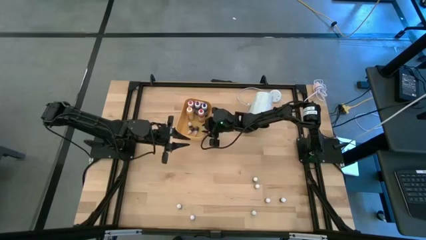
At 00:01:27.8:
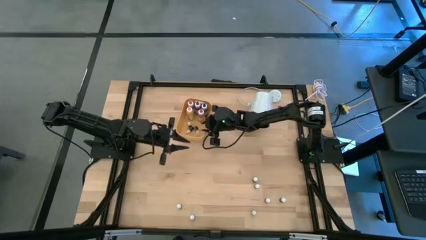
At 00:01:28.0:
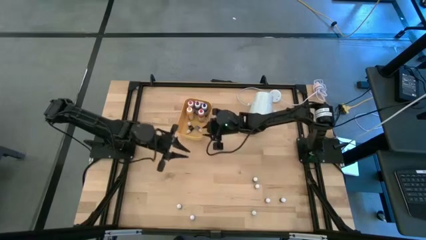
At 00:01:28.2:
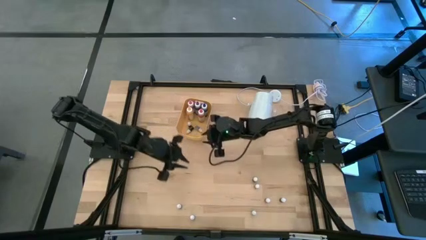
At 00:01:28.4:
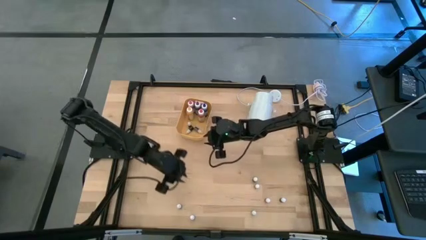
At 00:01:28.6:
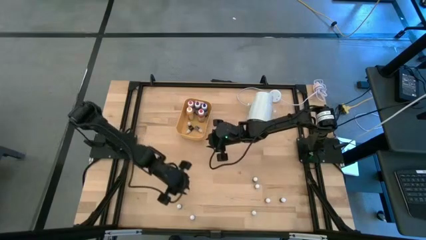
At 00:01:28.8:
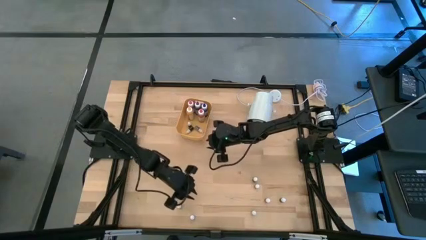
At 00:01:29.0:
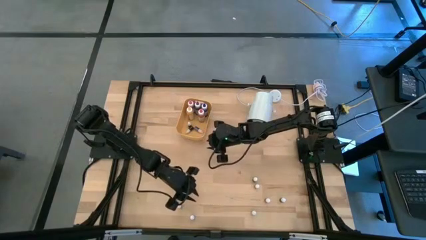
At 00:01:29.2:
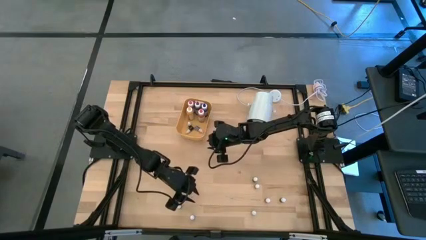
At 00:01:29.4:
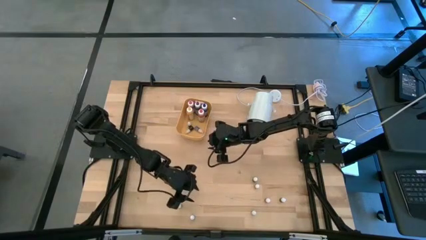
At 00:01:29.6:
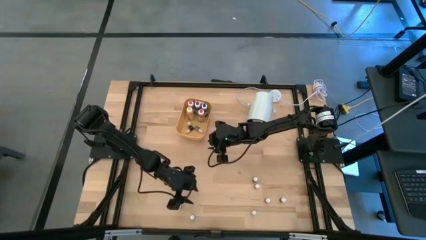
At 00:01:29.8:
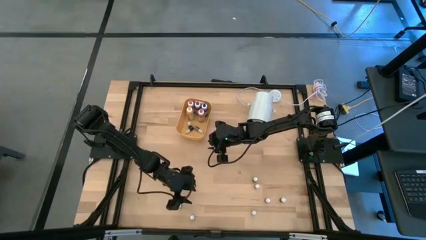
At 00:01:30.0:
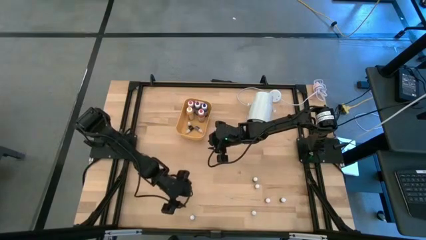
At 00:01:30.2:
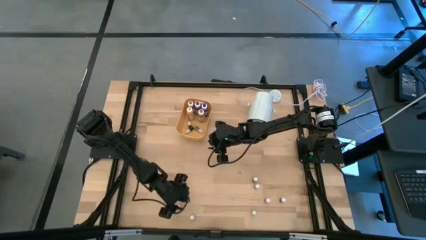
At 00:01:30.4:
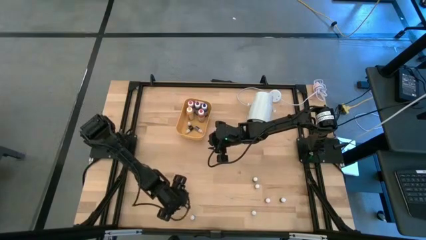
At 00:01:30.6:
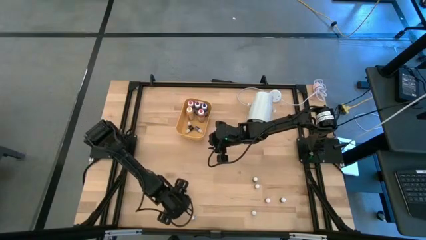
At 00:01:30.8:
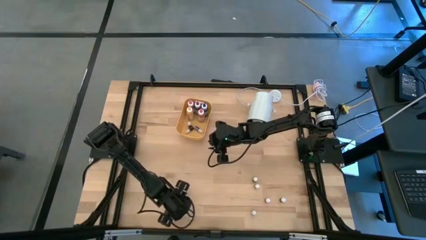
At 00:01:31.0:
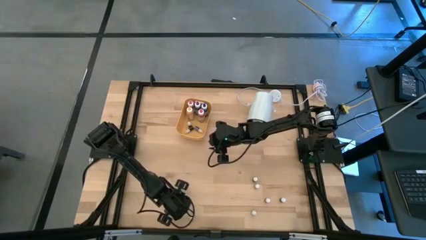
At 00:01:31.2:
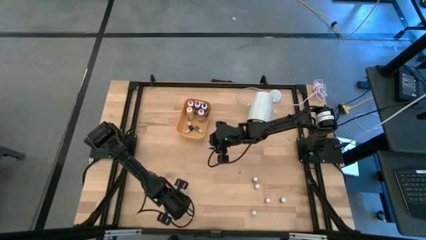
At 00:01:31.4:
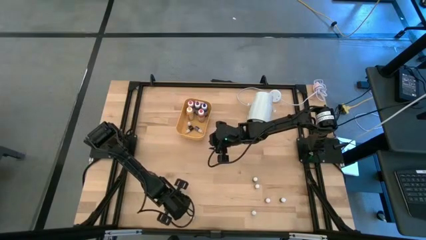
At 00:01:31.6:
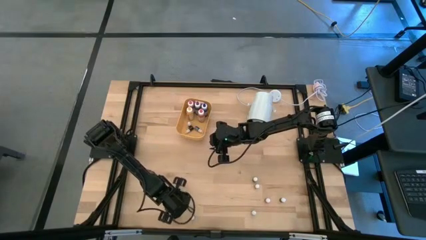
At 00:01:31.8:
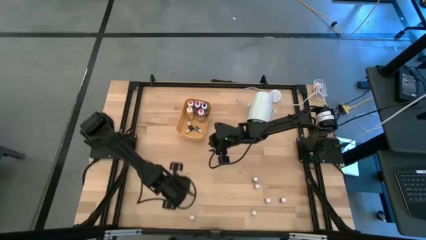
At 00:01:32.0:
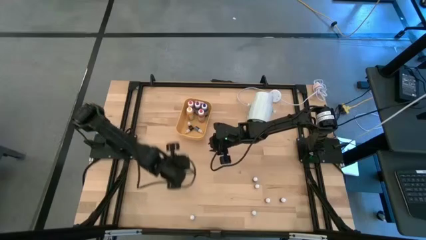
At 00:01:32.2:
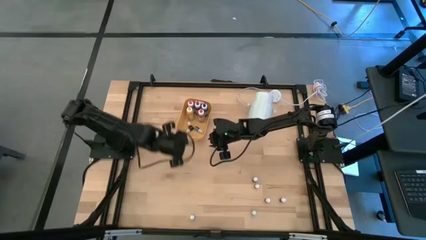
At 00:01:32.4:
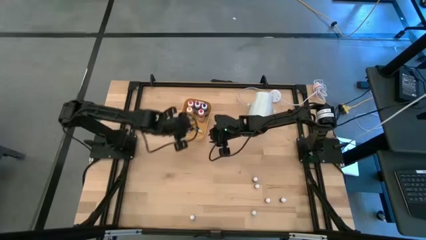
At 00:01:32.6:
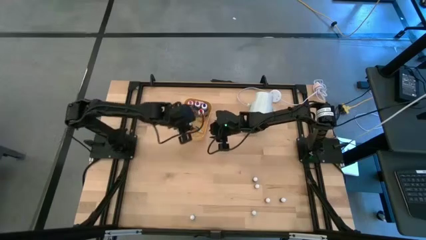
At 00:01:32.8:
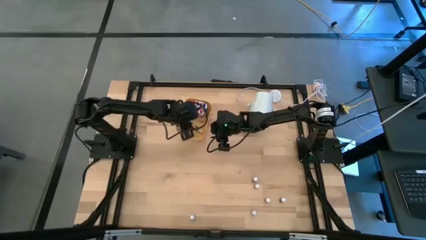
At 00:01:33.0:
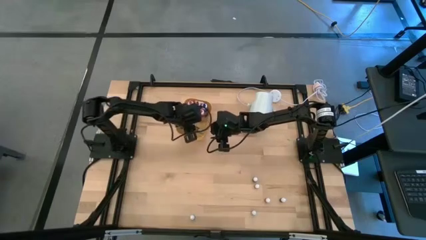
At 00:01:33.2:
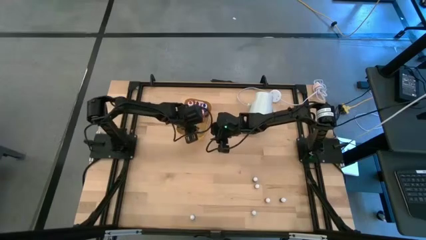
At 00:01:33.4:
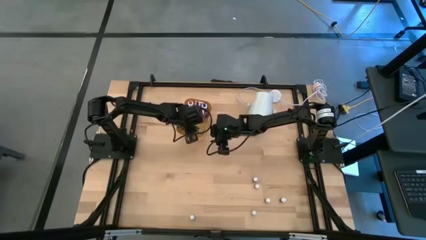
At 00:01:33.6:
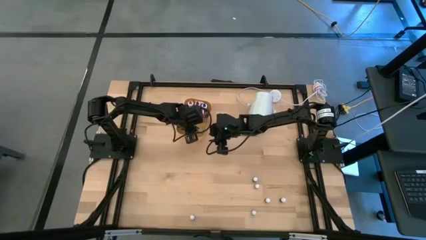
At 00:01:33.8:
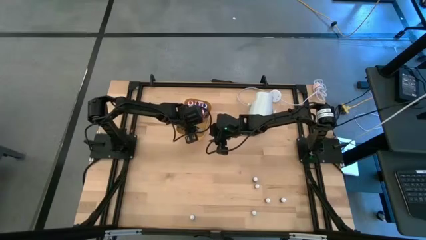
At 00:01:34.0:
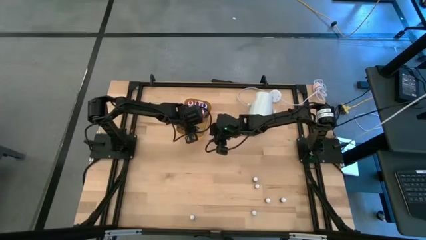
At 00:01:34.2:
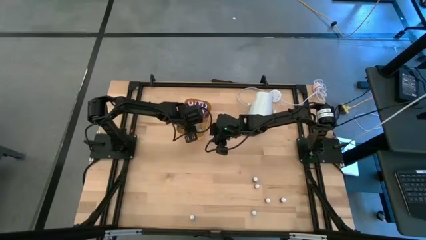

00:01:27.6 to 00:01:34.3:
Task: Pick & Place food coloring
Put the small purple food coloring bottle into the yellow bin

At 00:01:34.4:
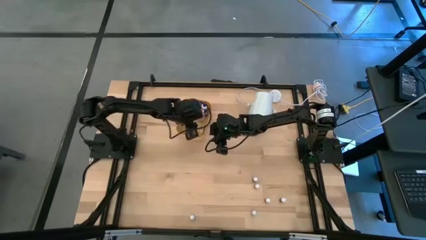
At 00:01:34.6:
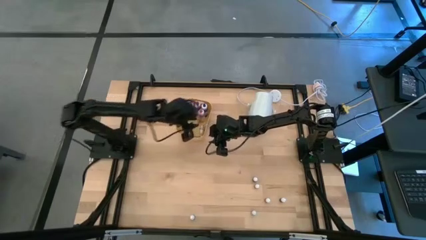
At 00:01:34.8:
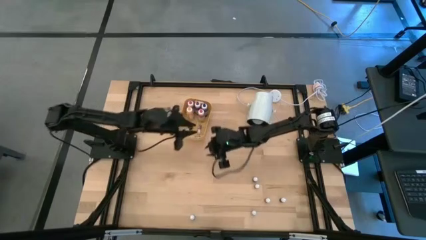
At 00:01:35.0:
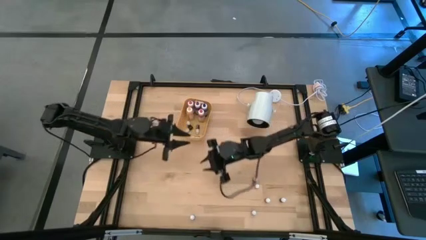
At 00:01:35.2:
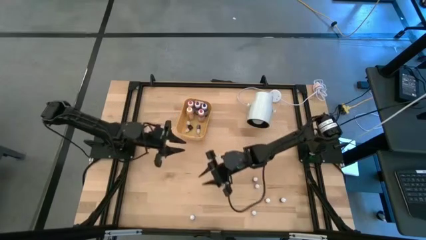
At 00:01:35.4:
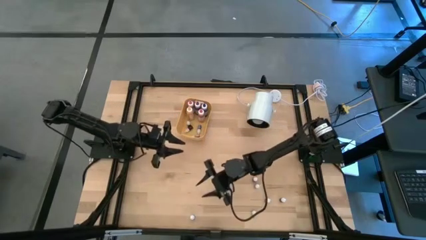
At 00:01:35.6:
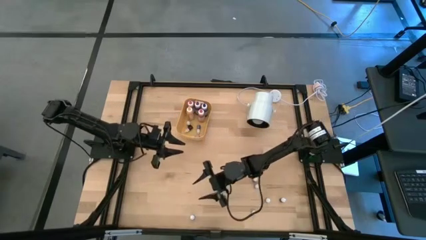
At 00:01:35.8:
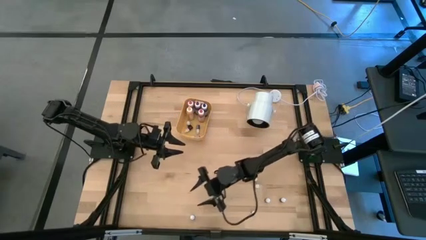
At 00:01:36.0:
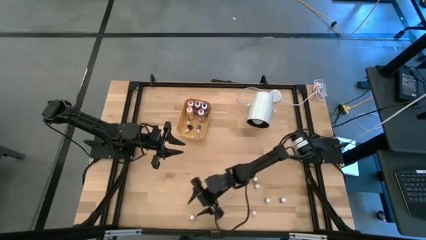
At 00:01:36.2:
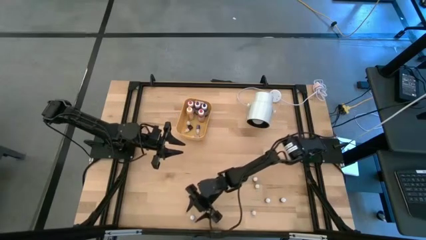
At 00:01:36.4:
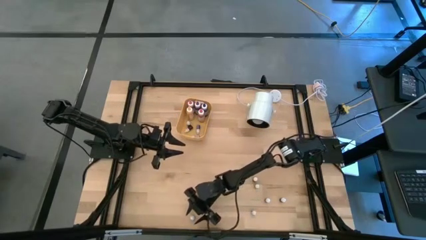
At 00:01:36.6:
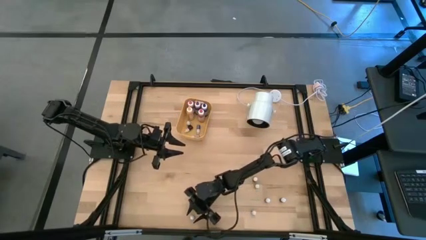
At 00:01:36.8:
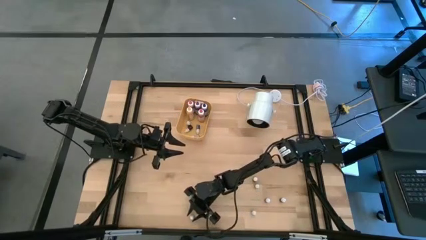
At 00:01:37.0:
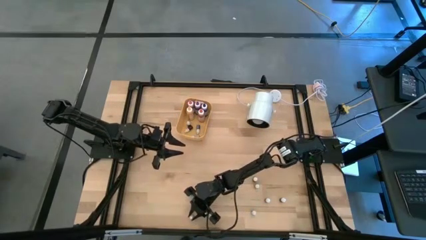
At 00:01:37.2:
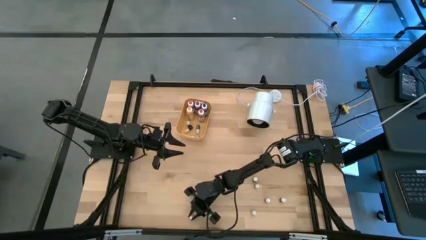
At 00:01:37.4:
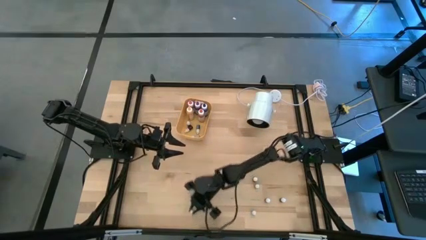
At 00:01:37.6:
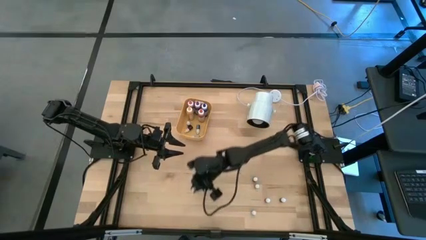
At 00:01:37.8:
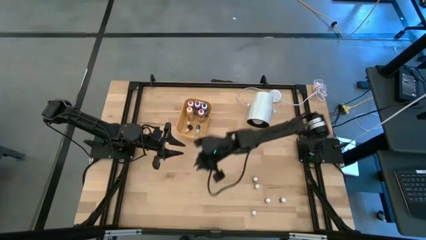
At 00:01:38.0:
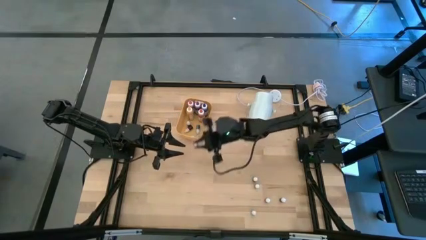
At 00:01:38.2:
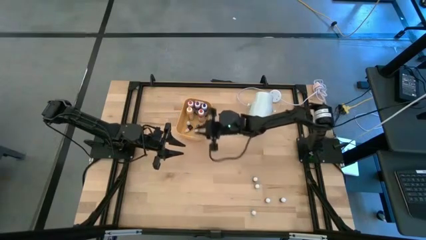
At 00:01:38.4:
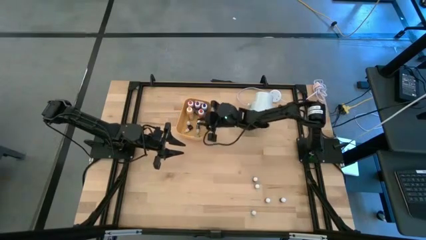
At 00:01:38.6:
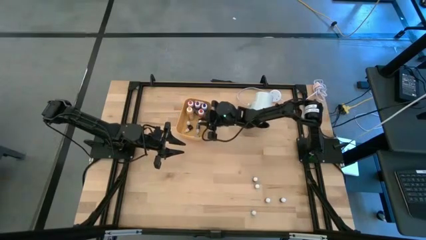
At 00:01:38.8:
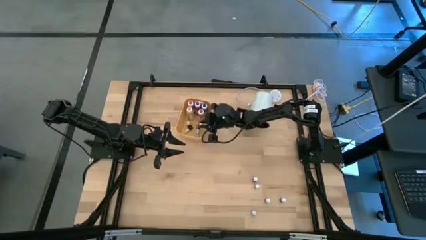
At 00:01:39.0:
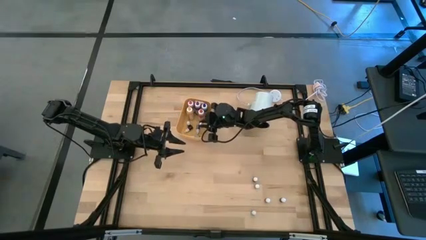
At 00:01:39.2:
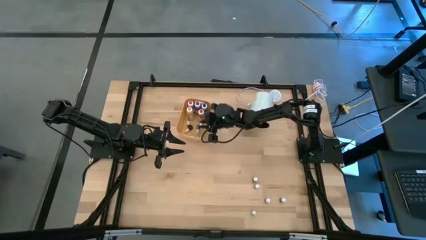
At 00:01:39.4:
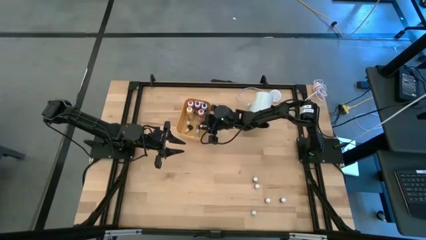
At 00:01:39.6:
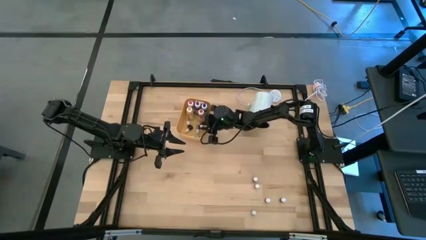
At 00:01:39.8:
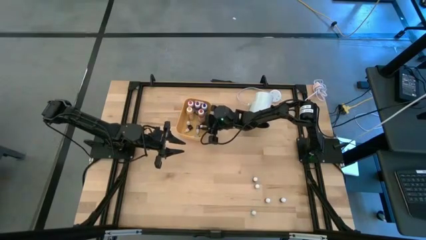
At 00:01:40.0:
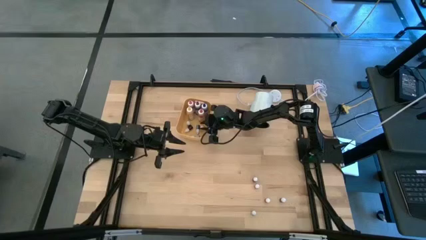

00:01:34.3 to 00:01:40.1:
Put the left small green food coloring bottle into the yellow bin

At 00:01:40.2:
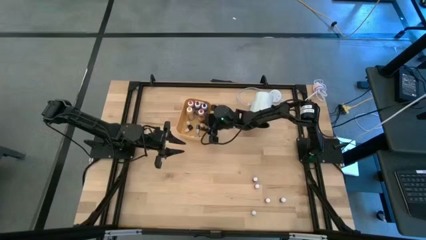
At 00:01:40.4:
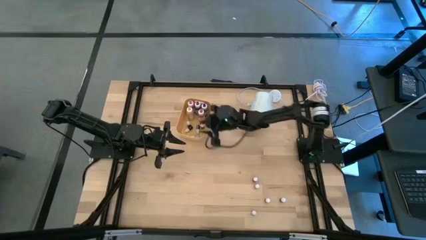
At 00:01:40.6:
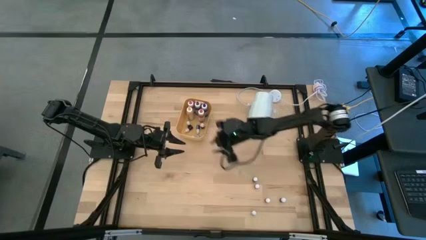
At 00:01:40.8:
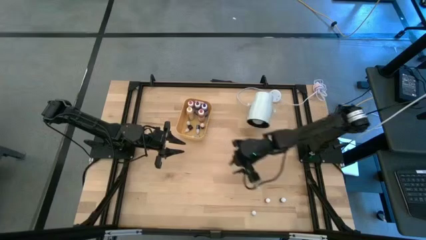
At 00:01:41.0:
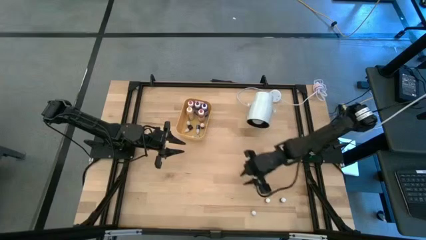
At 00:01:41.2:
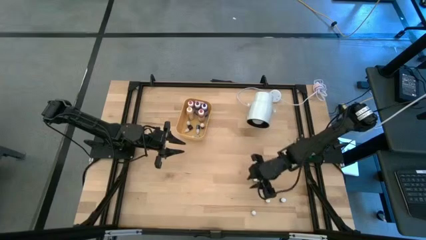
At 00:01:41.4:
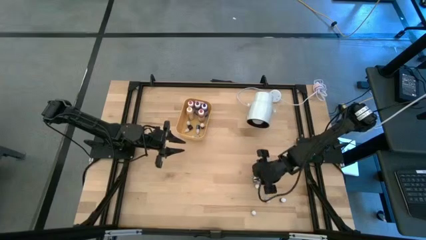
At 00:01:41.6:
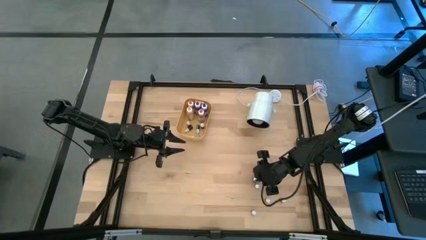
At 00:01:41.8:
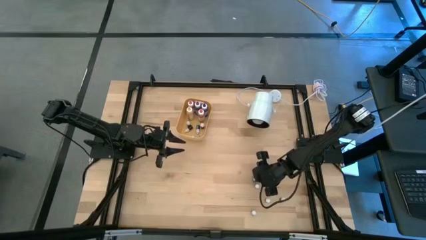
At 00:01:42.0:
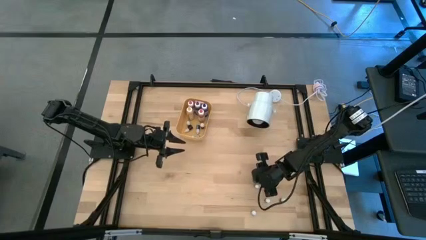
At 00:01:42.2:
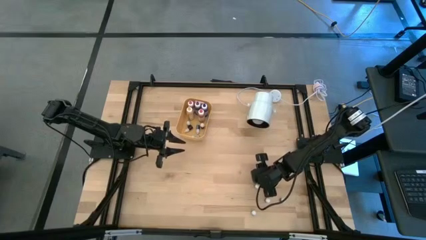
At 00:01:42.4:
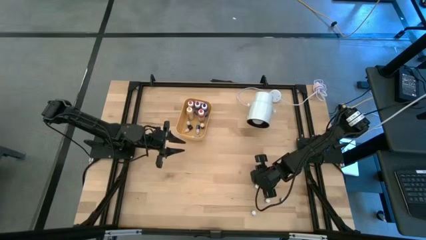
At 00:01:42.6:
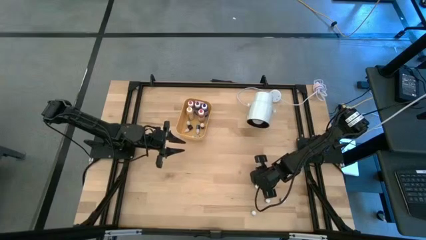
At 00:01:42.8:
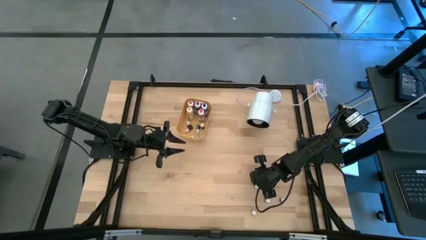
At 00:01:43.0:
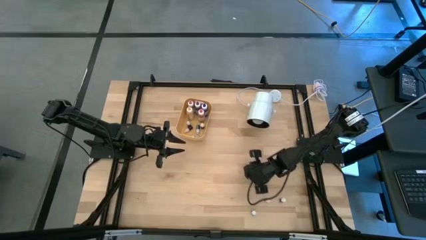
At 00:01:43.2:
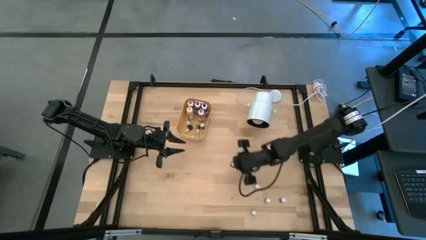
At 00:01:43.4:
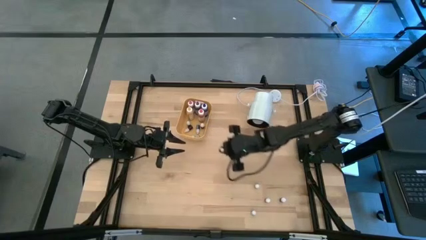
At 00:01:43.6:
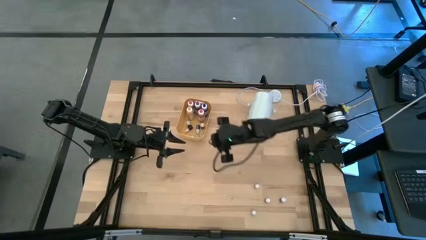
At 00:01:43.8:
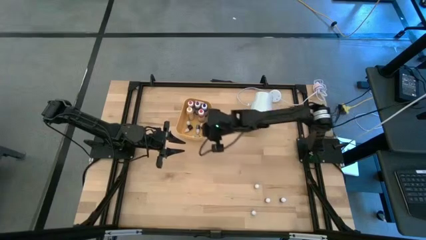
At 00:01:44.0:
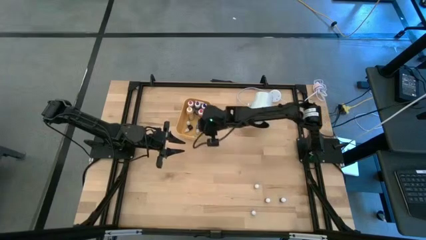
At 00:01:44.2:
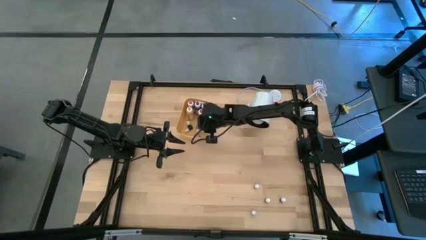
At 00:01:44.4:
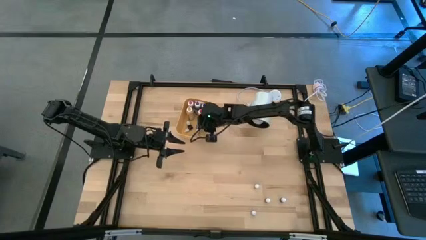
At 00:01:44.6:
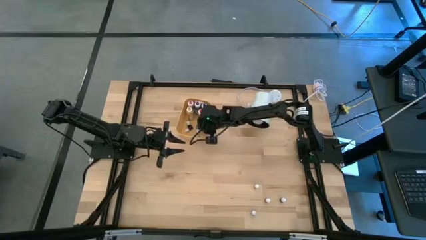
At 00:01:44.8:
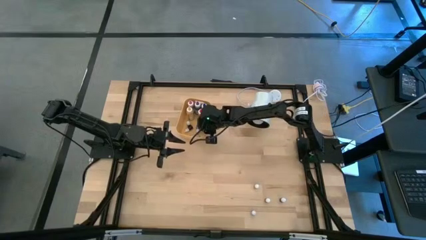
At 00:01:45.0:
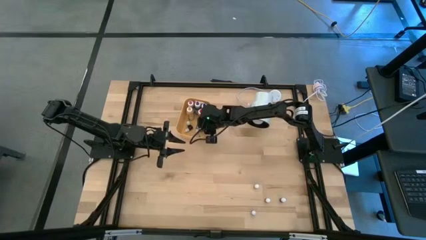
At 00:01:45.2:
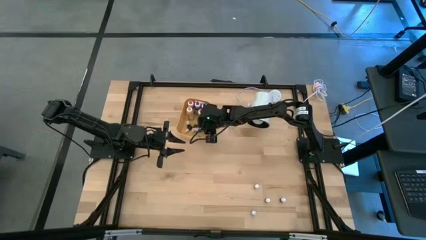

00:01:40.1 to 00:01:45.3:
Put the small green food coloring bottle into the yellow bin
